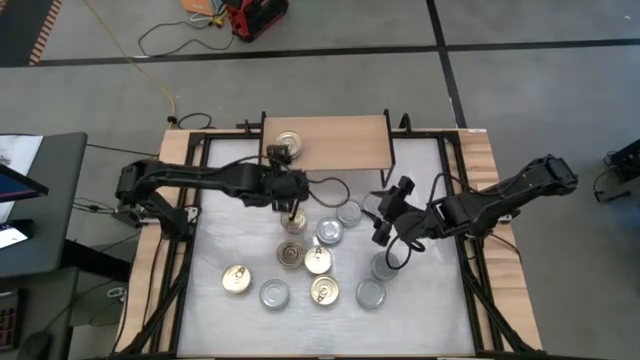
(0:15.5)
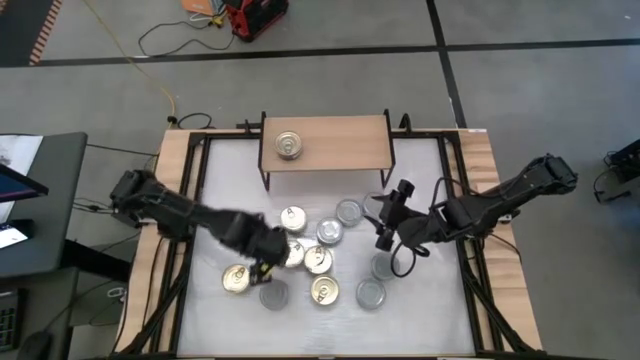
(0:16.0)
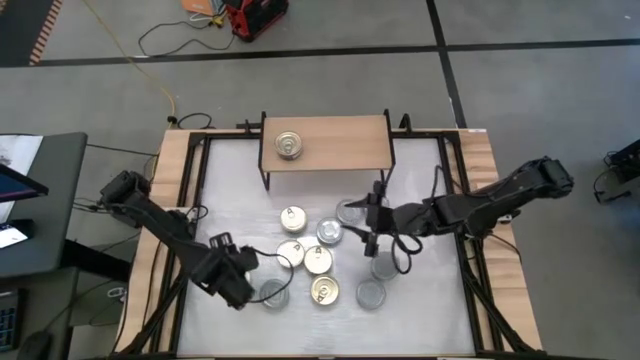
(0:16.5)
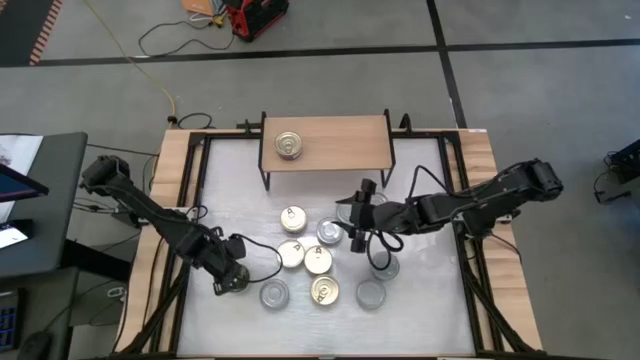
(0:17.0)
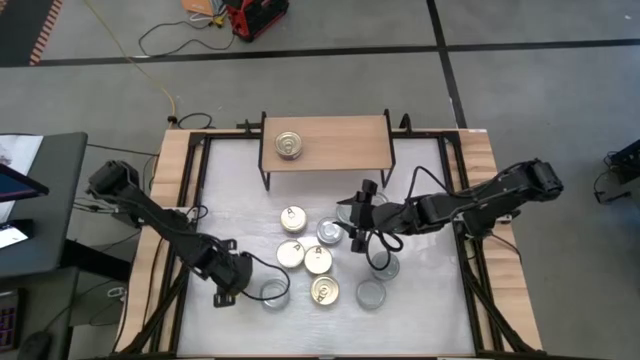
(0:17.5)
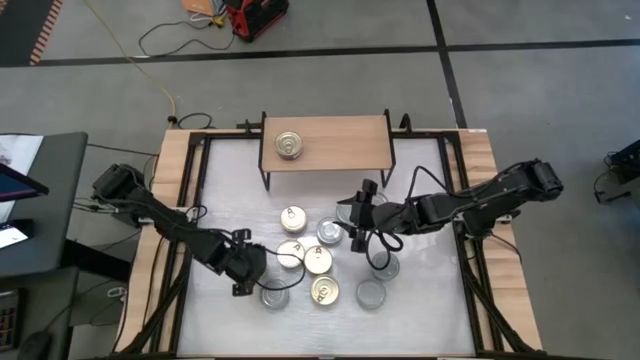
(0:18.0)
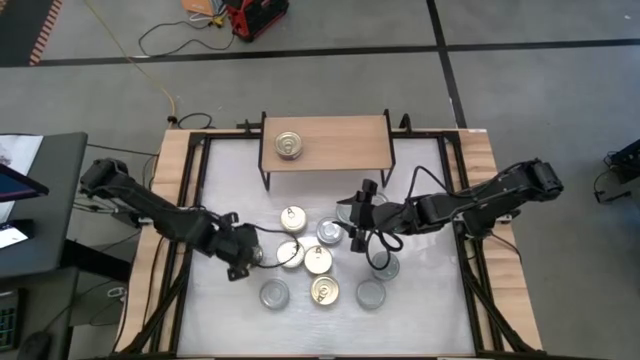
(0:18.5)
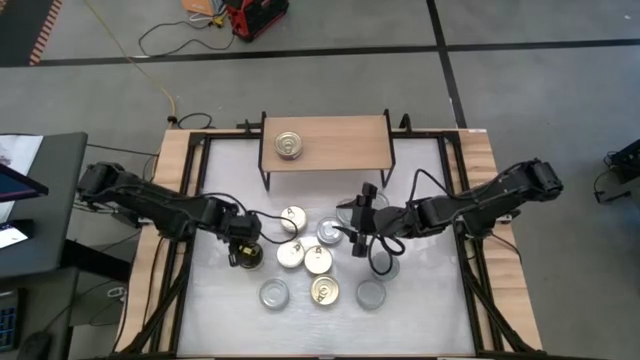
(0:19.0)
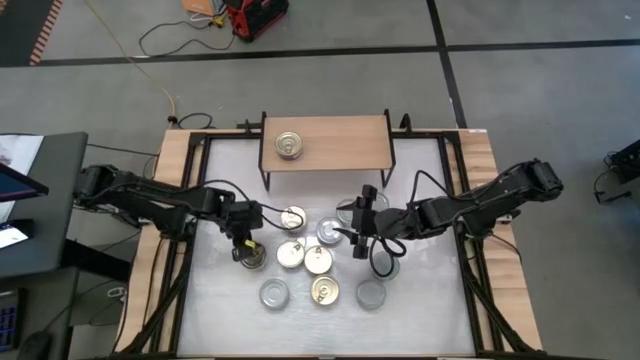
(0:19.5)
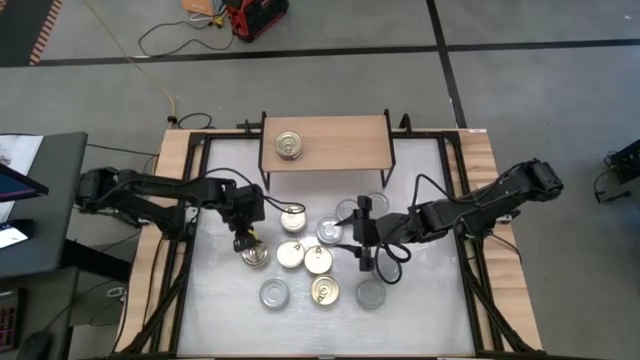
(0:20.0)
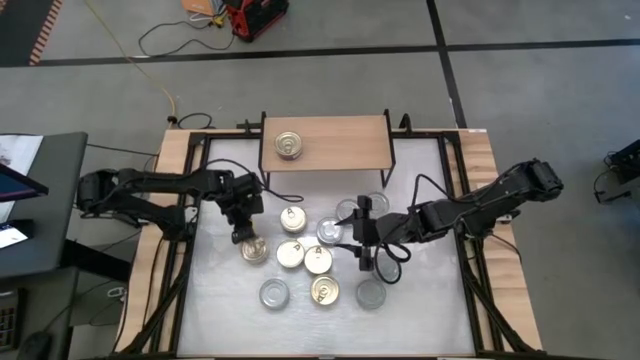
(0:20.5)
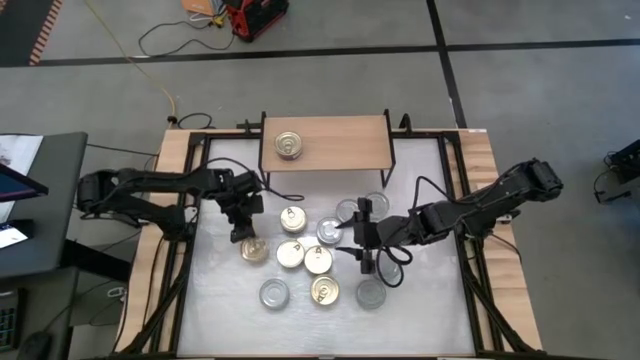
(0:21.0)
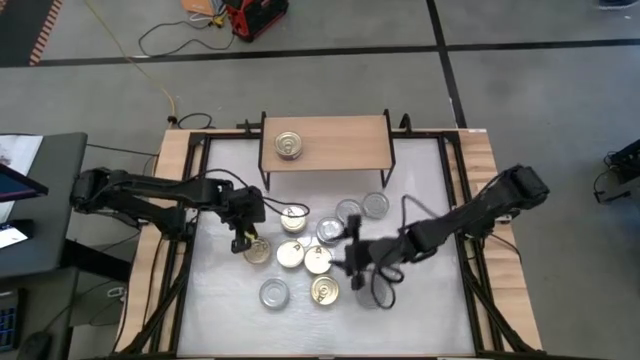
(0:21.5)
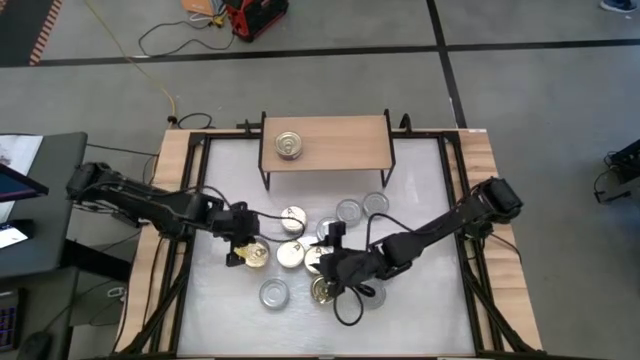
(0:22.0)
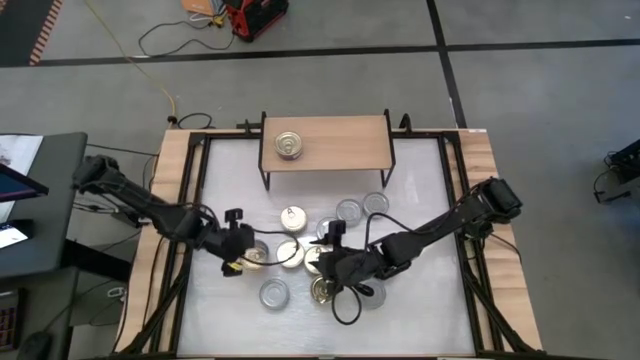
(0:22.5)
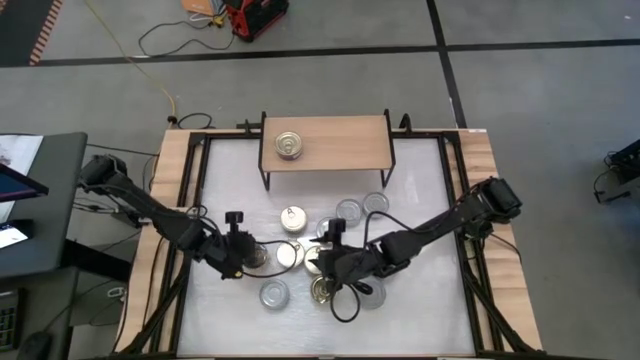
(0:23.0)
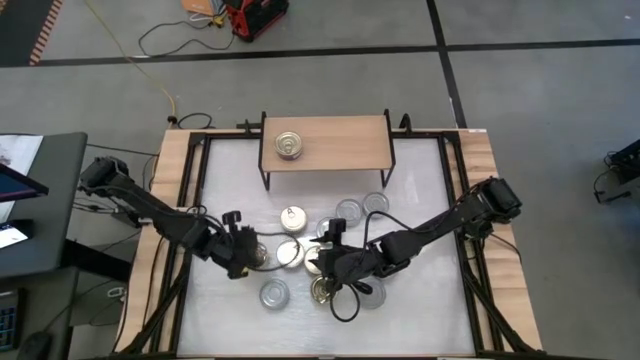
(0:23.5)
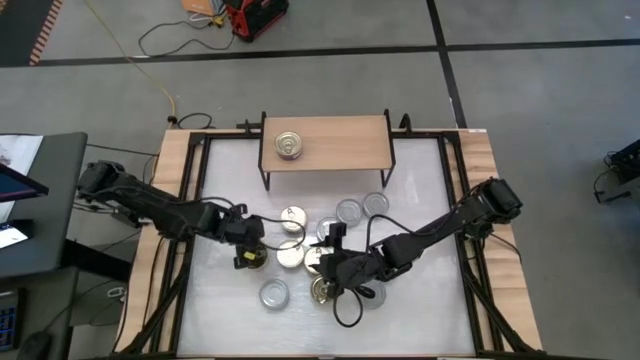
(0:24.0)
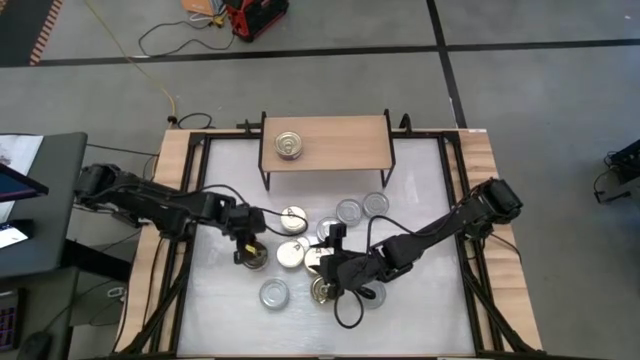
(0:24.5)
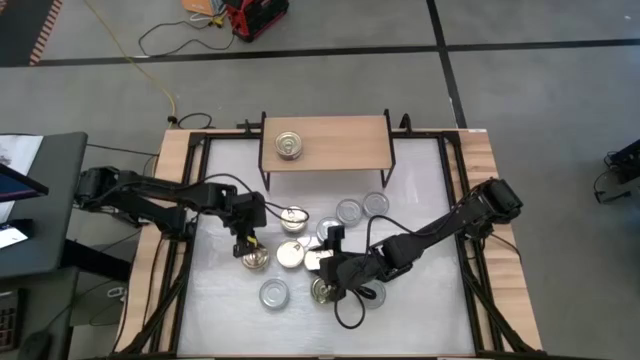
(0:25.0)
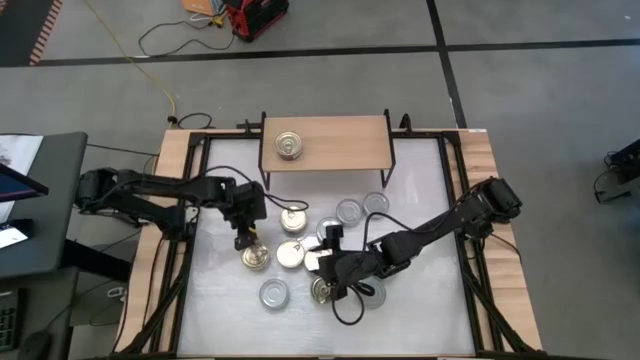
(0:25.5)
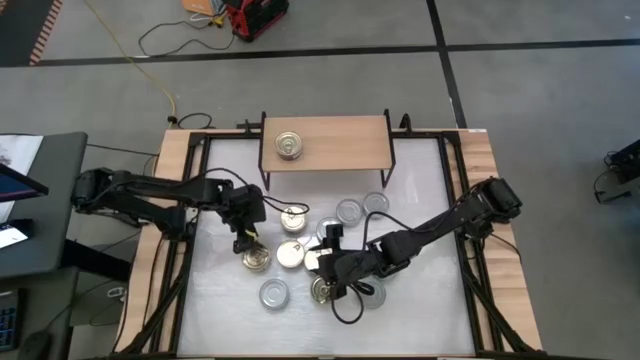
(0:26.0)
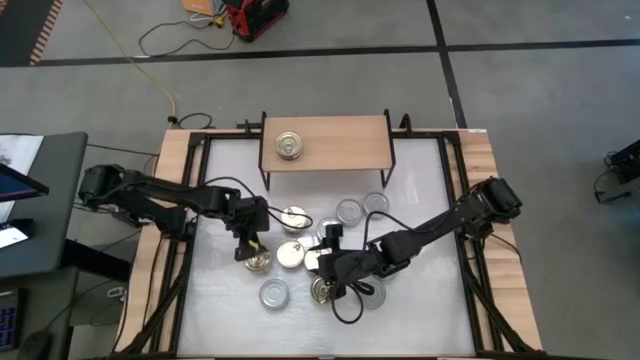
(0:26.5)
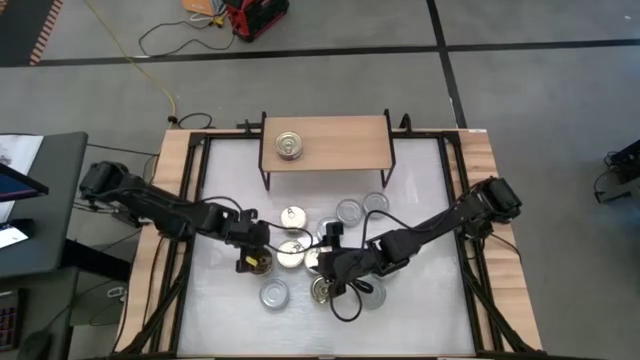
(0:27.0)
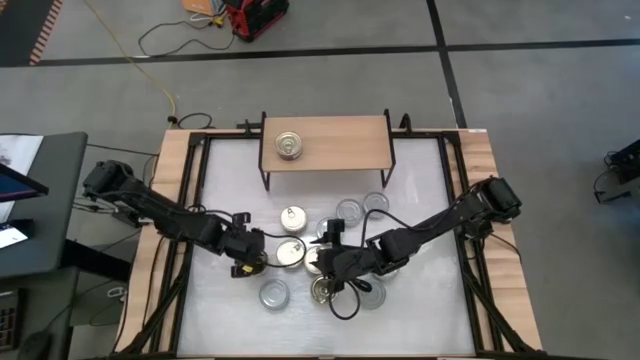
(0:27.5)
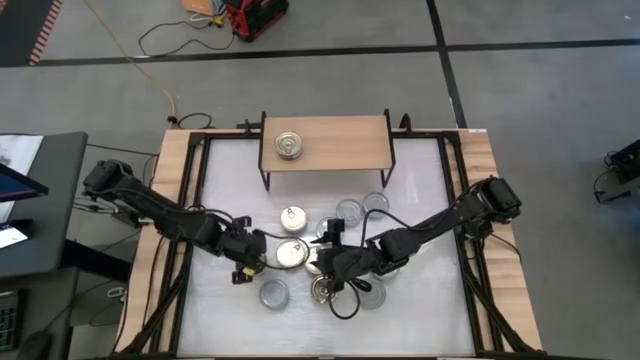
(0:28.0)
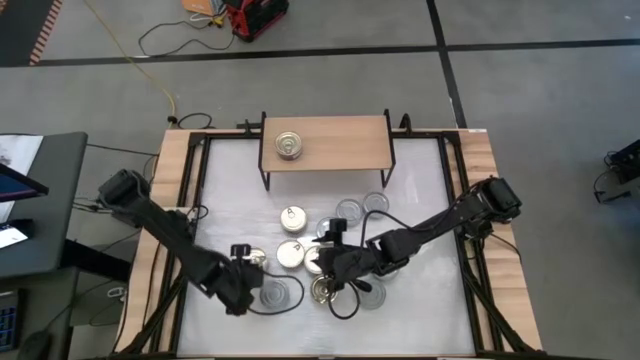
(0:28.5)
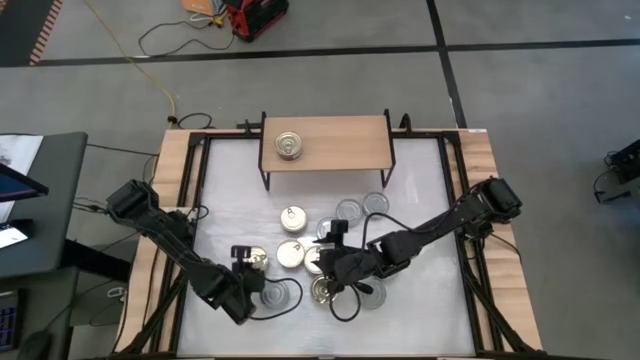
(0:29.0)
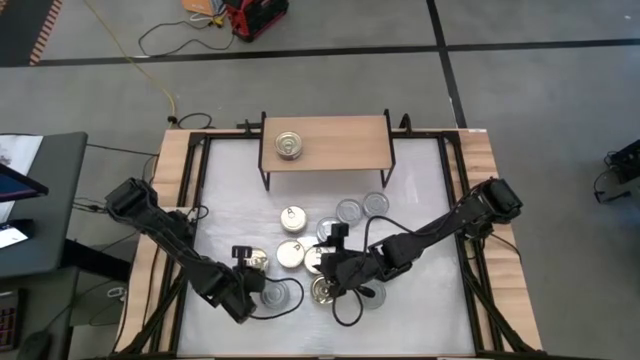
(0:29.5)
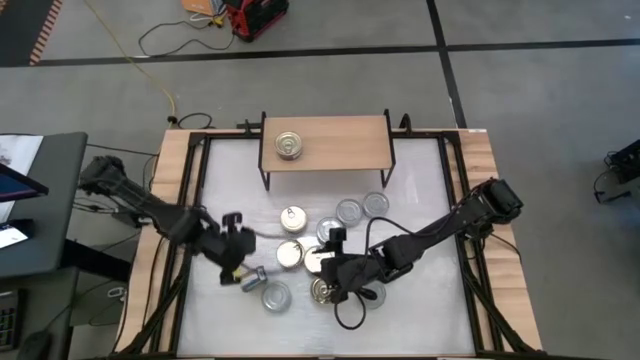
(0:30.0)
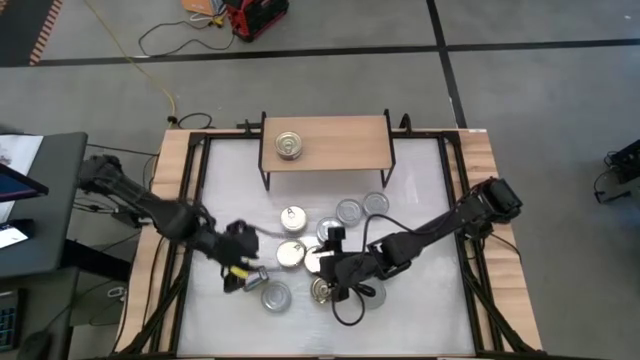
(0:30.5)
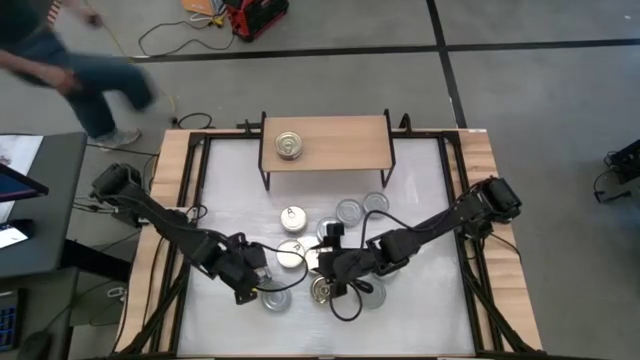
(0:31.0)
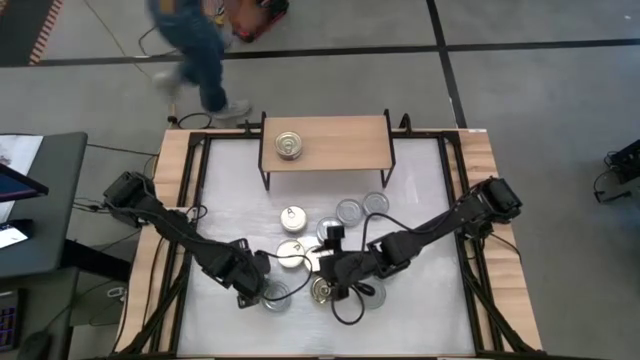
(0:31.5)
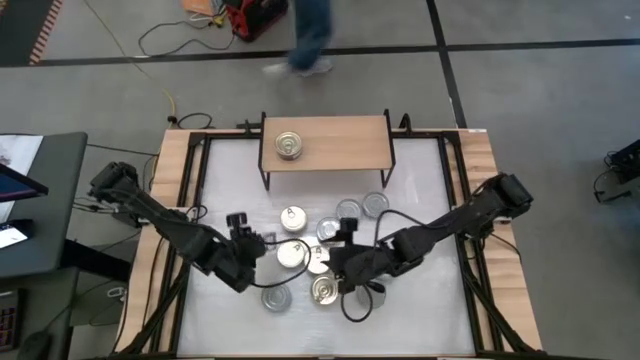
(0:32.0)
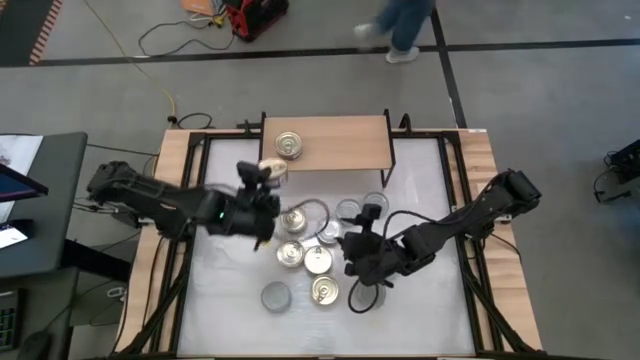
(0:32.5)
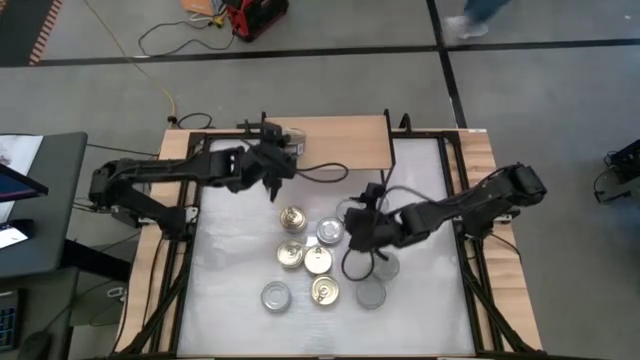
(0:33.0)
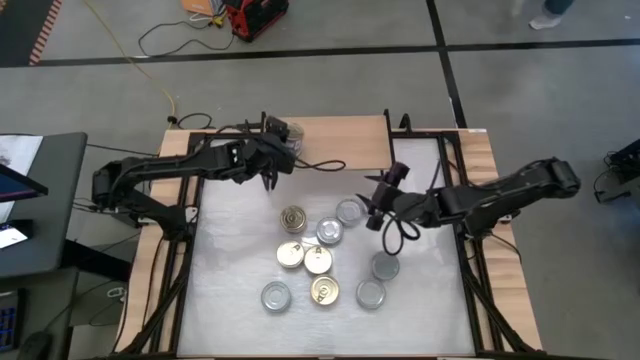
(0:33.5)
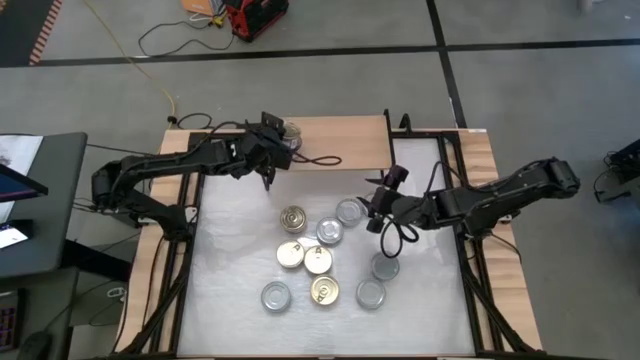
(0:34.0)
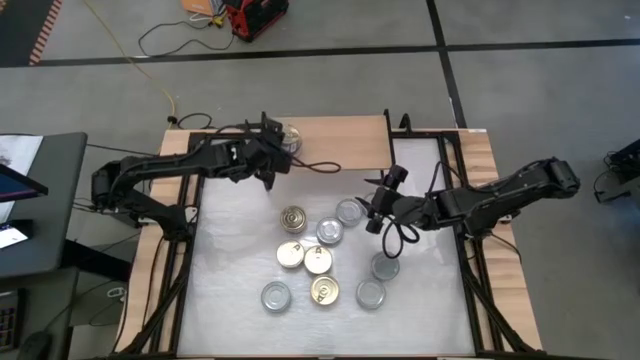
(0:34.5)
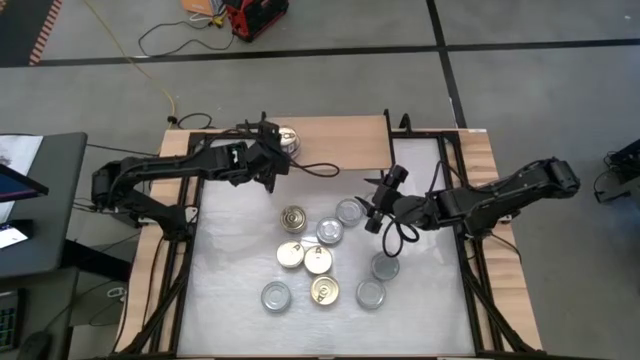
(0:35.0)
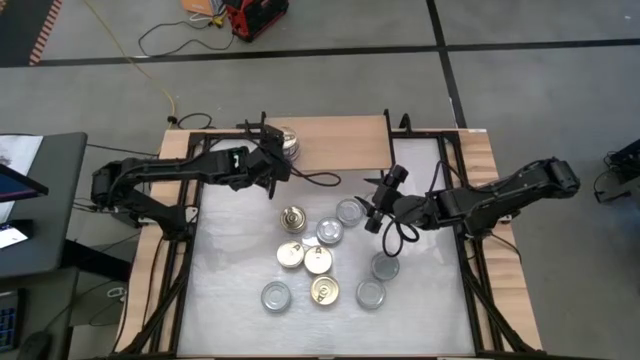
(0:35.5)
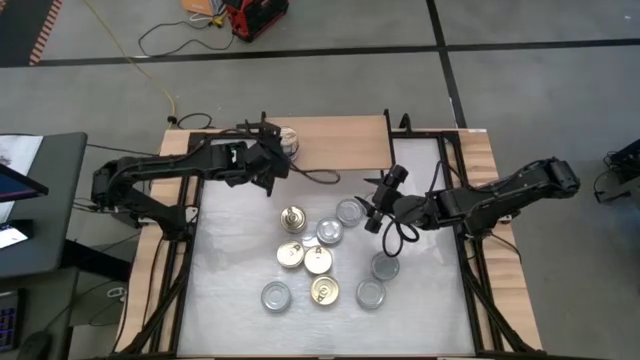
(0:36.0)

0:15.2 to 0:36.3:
Task: Stack canned seafood by type on shelf
Stack the blue tuna can on top of the blue tuna can
